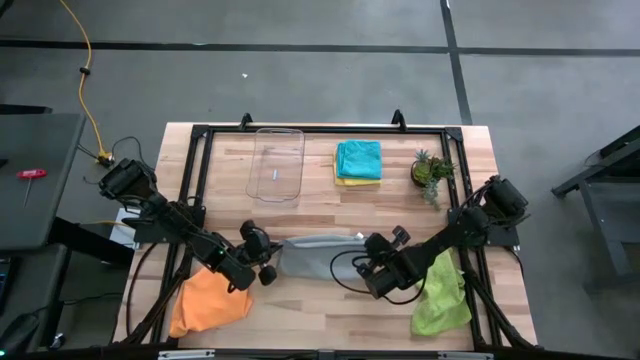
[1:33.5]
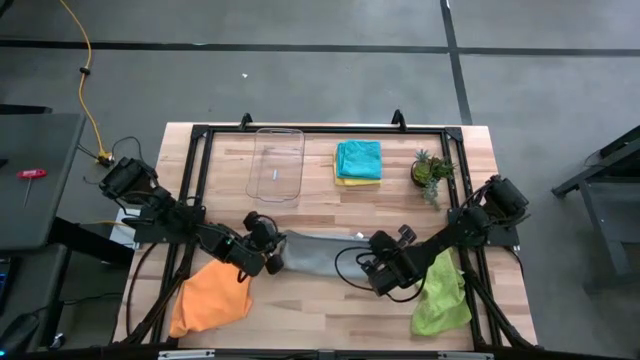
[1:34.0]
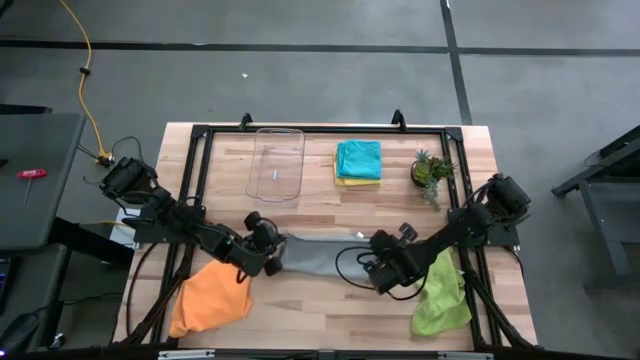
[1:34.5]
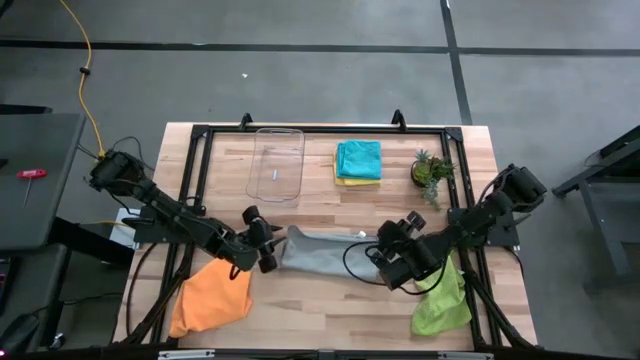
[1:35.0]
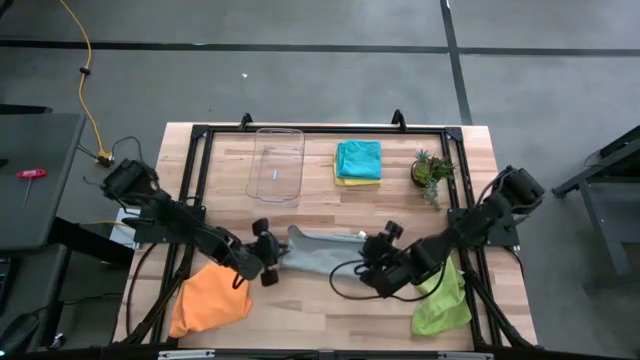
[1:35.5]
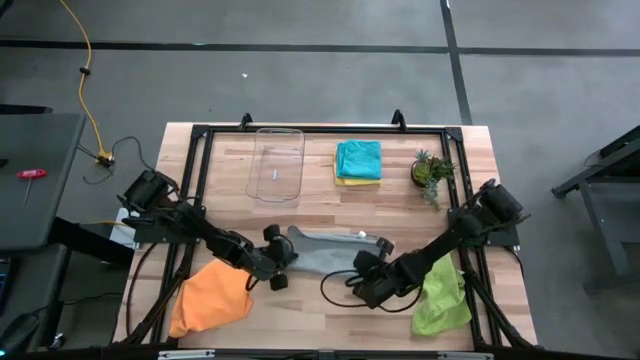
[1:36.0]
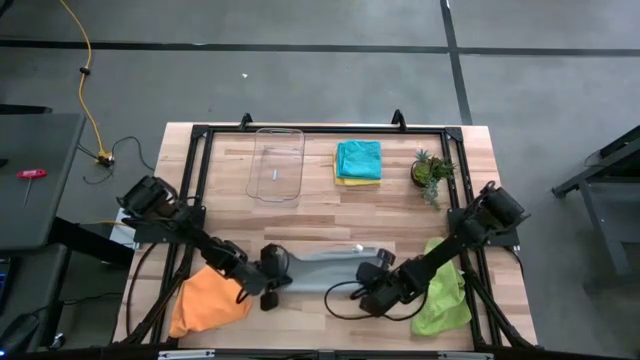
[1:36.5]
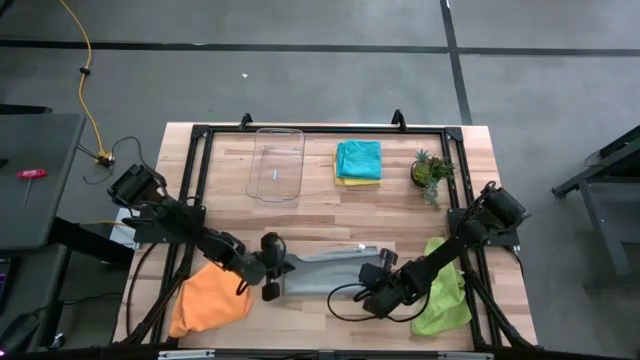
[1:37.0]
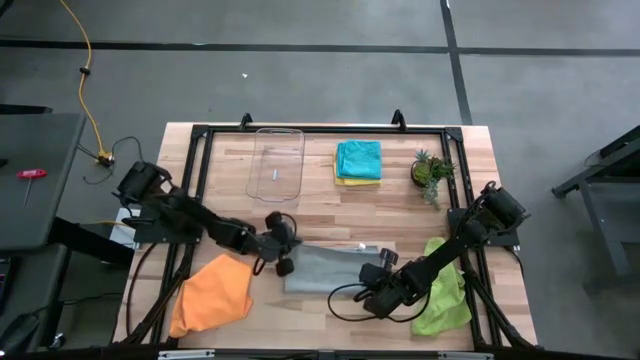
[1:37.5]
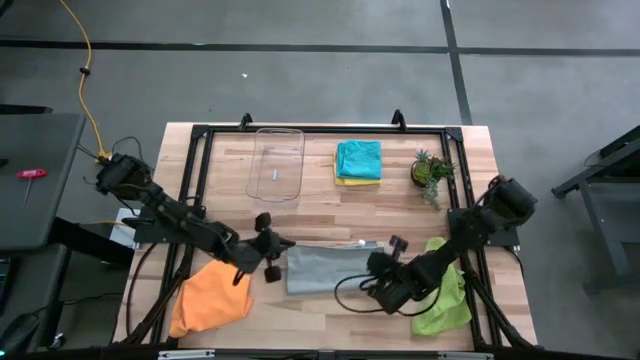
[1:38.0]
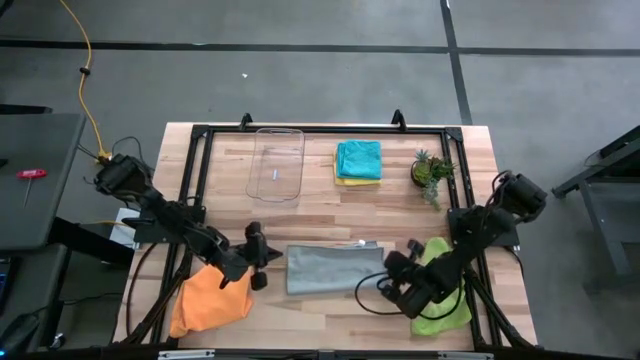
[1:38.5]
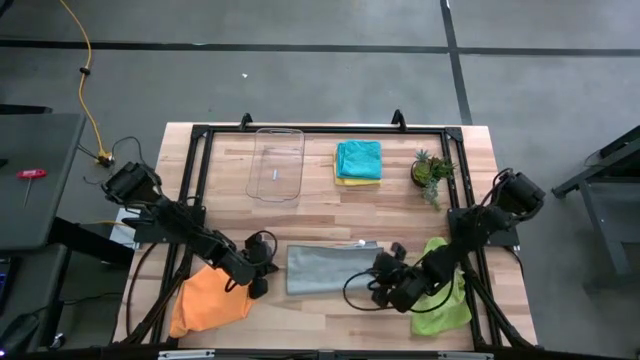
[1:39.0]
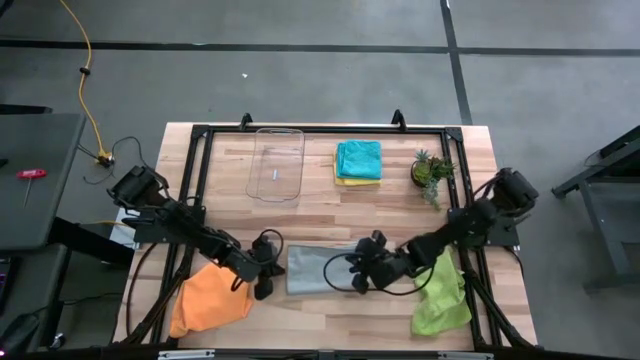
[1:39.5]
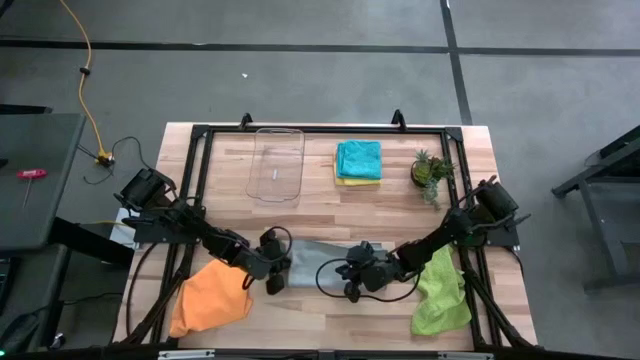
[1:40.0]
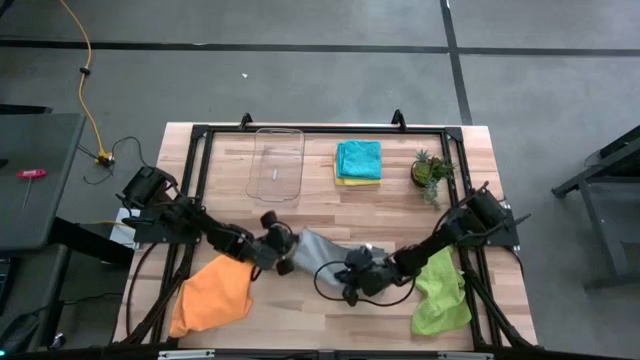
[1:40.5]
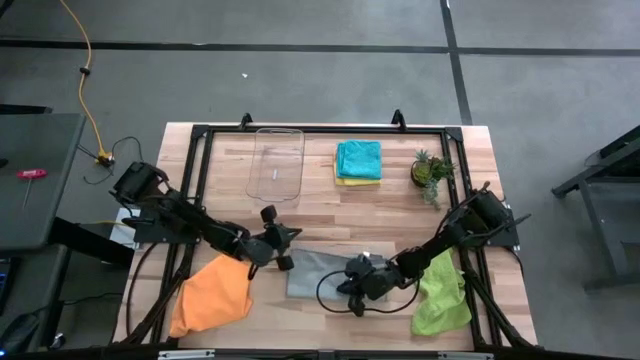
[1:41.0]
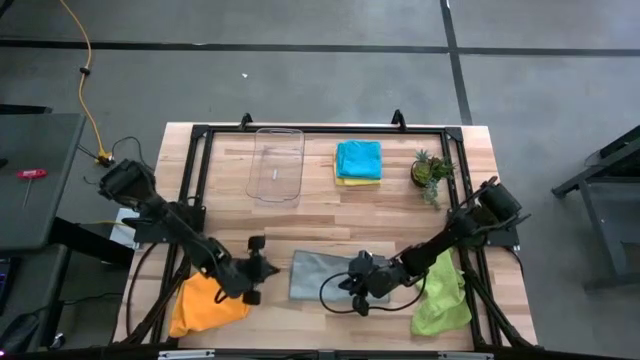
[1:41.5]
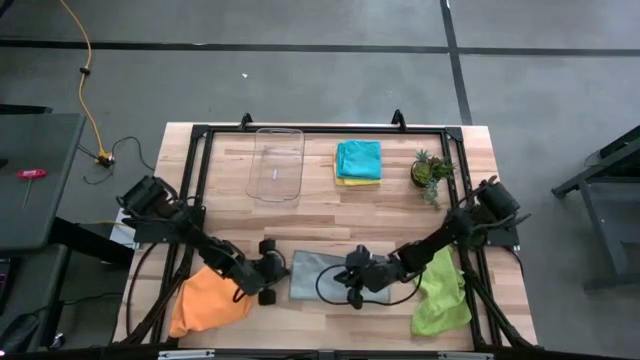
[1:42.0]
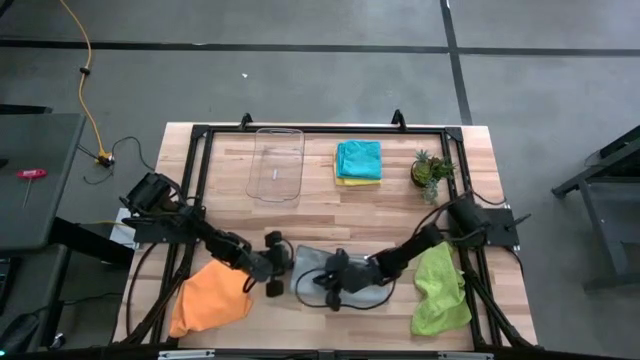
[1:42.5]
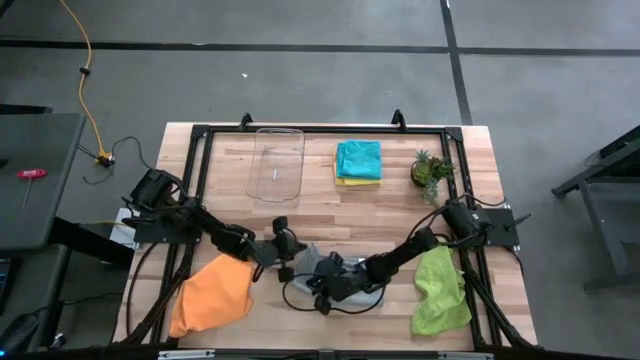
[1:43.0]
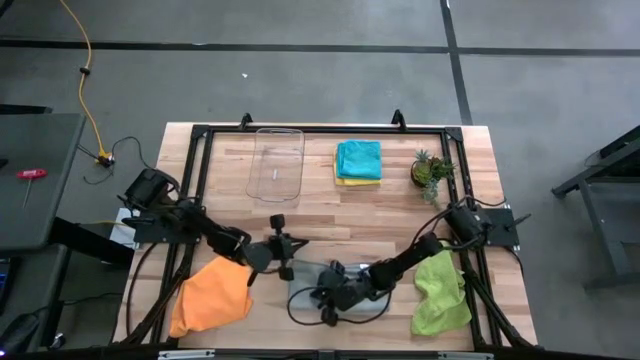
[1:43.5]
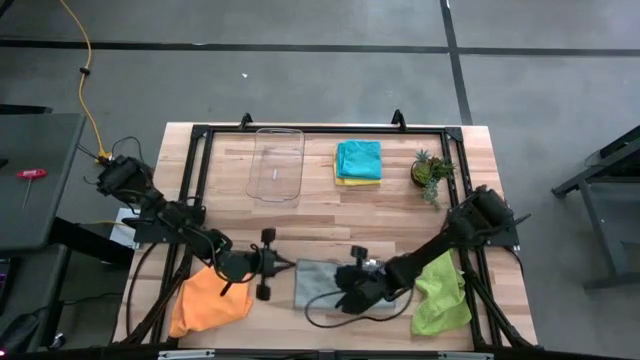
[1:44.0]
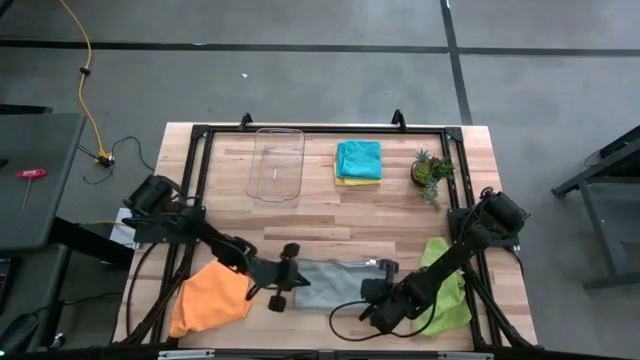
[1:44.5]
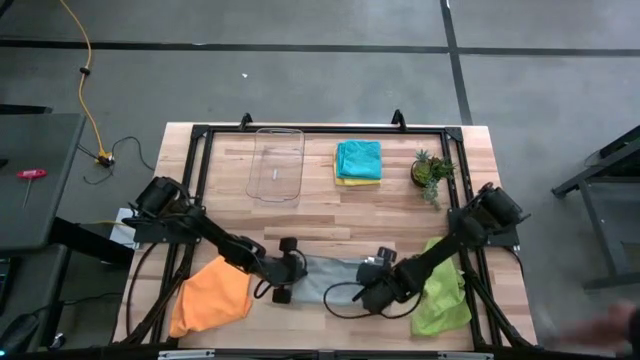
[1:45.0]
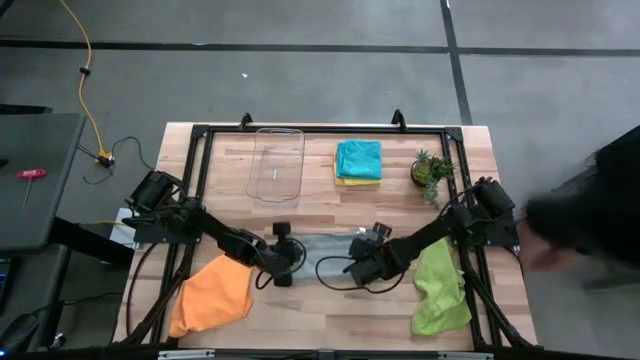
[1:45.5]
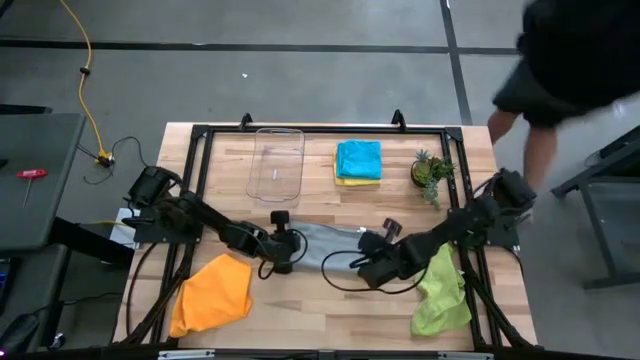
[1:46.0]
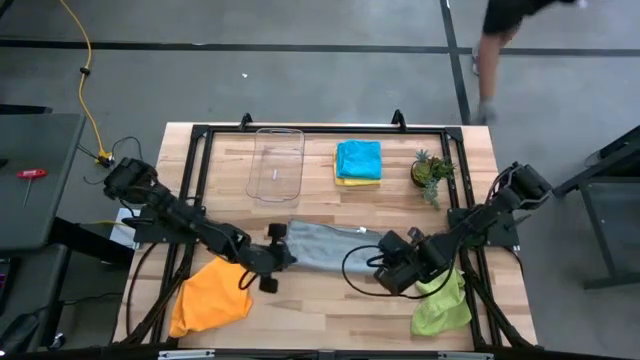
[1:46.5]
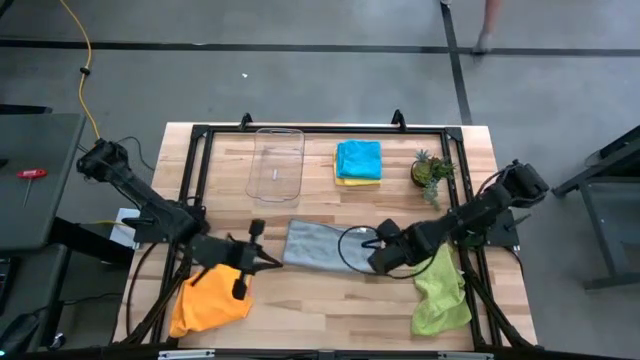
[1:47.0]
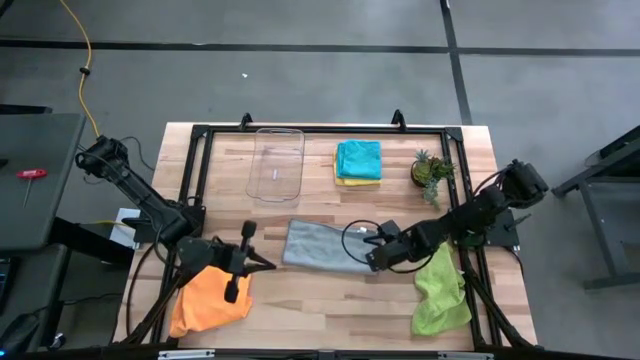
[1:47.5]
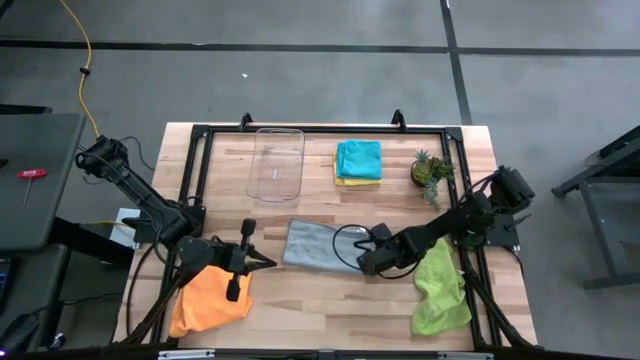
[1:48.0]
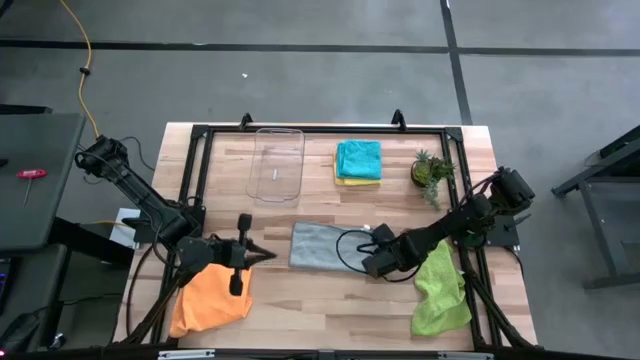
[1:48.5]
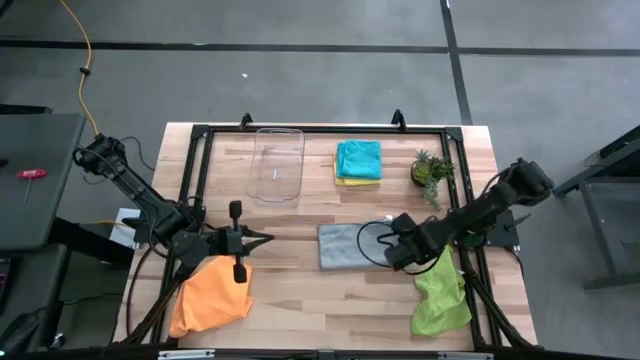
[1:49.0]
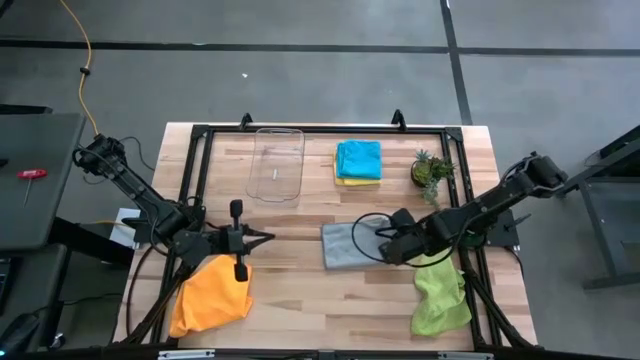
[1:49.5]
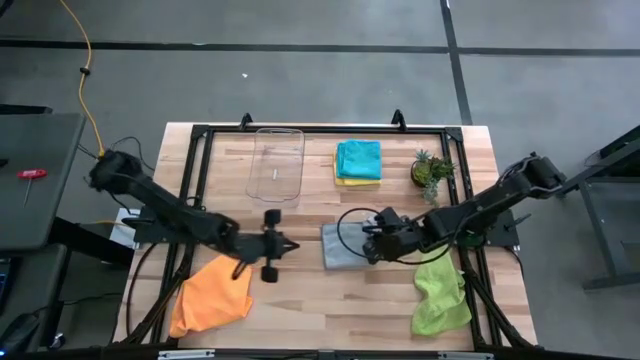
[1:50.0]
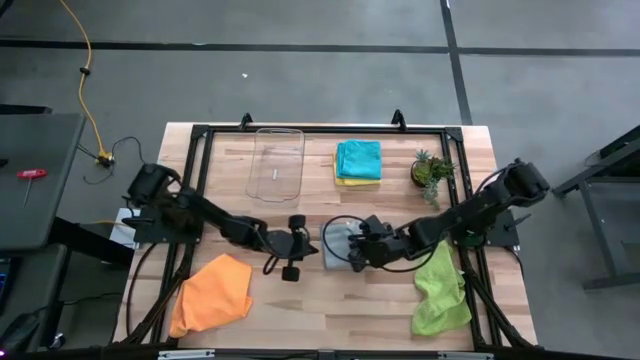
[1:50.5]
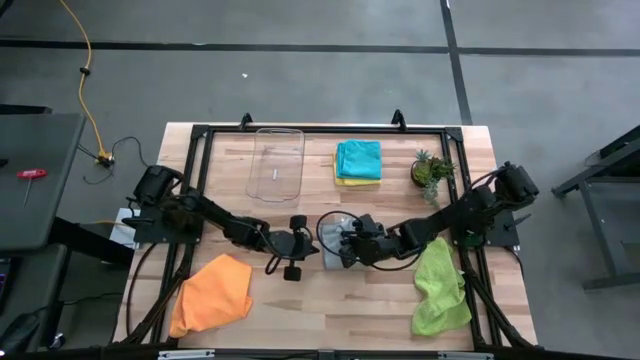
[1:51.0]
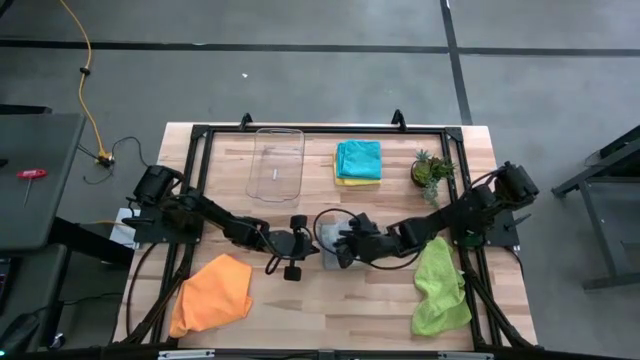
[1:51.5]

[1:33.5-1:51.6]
Task: Fold microfiber towels
Fold the gray microfiber cloth

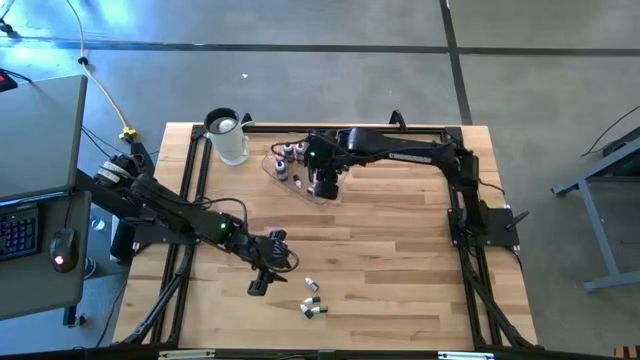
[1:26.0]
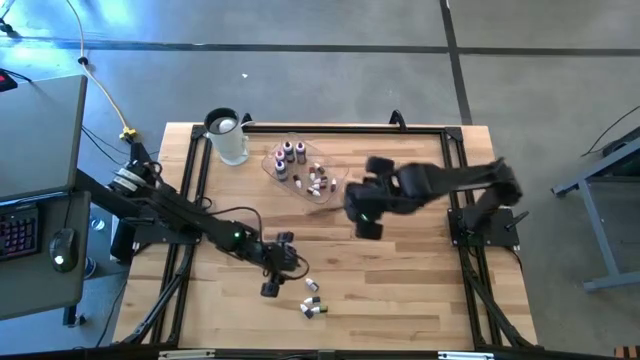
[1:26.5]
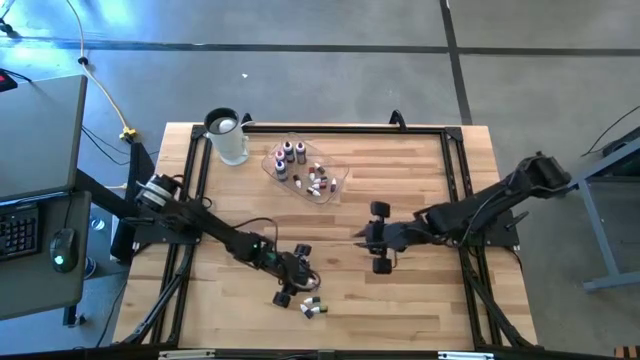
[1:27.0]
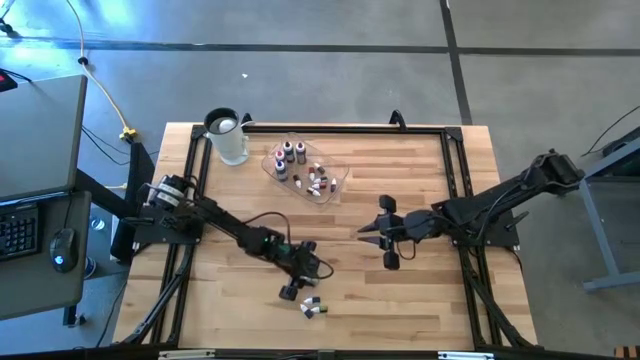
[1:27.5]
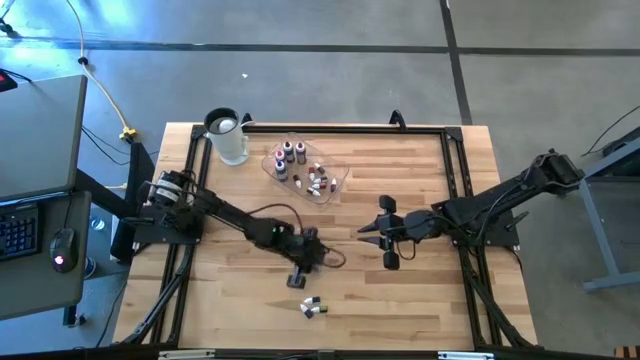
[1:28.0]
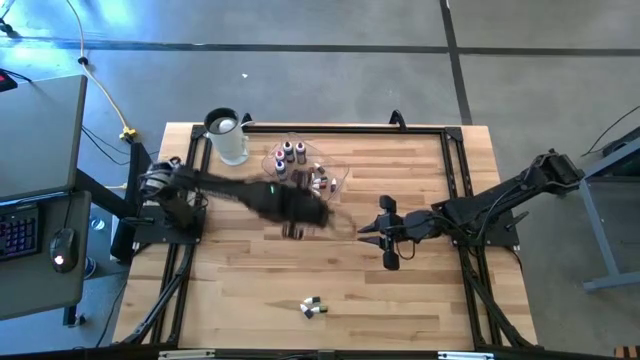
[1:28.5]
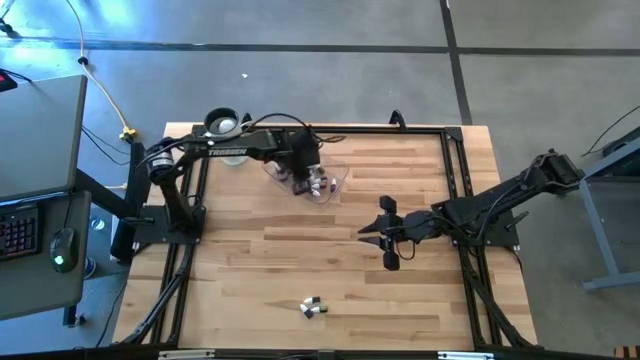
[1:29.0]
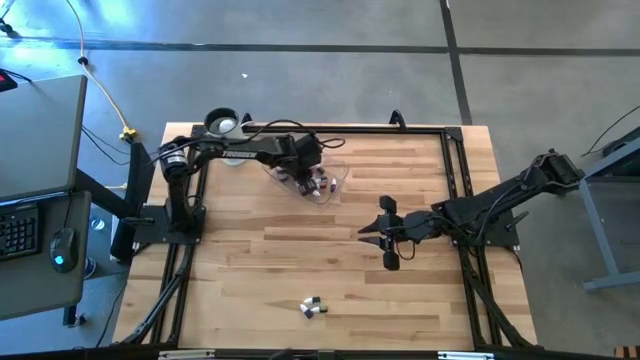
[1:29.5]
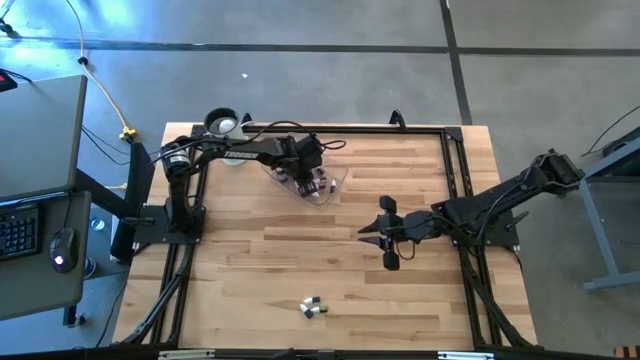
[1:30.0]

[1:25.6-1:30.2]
Task: Pick & Place food coloring
Put the small purple food coloring bottle into the bin
